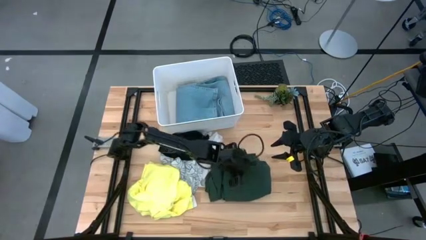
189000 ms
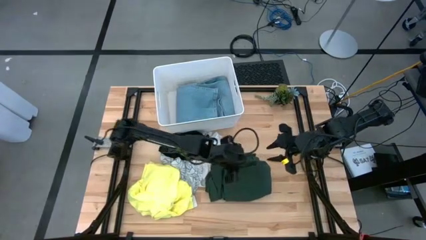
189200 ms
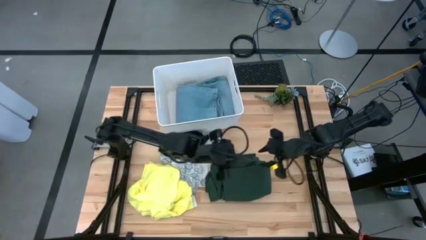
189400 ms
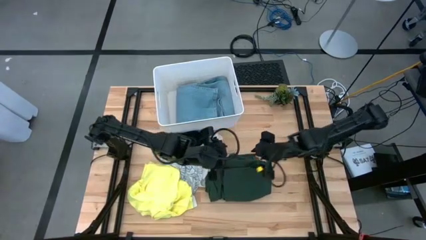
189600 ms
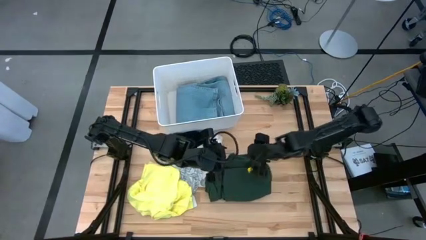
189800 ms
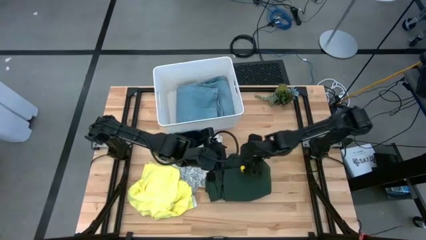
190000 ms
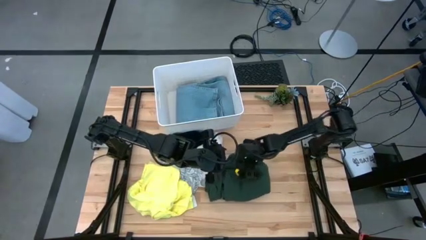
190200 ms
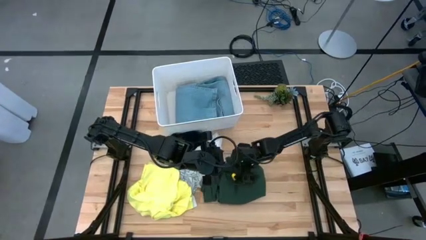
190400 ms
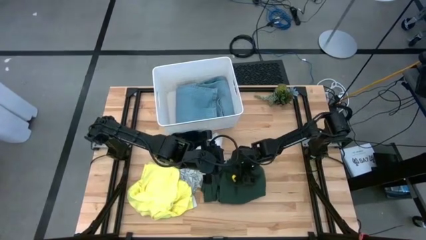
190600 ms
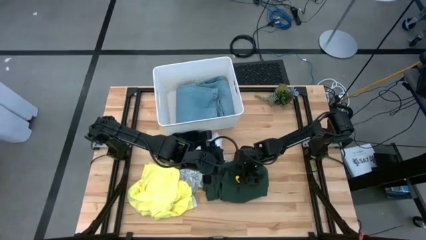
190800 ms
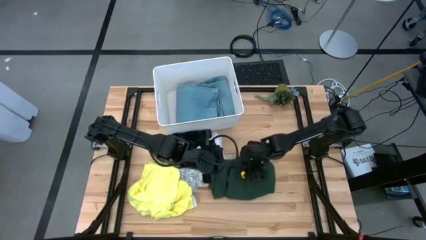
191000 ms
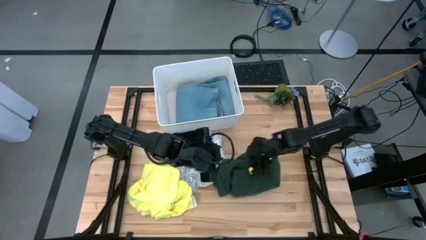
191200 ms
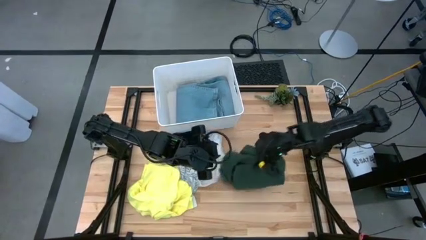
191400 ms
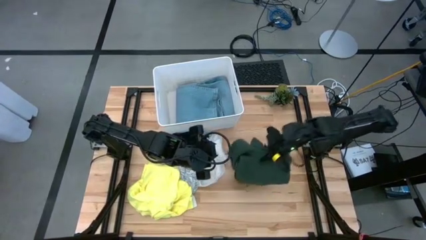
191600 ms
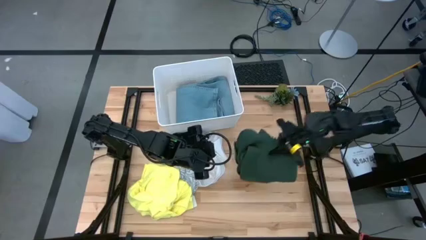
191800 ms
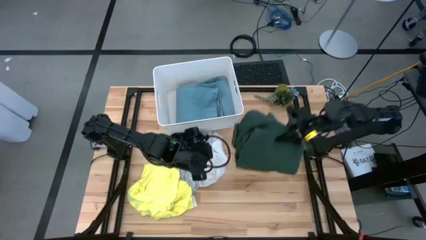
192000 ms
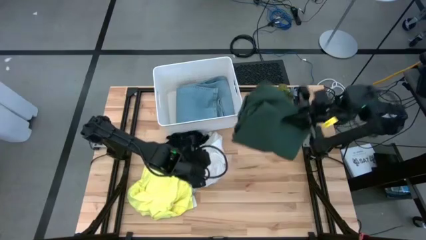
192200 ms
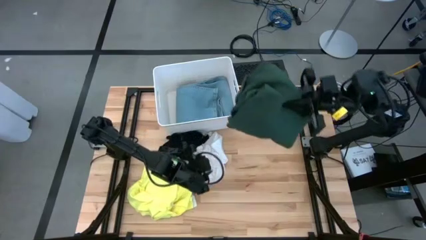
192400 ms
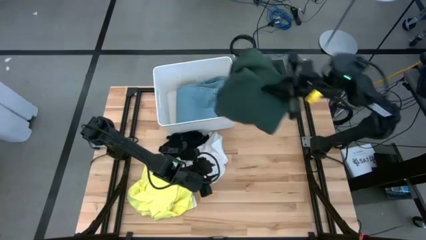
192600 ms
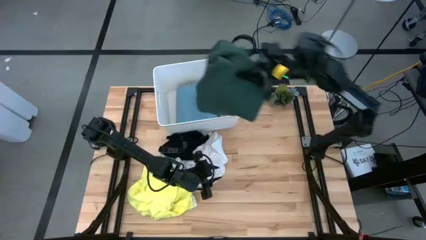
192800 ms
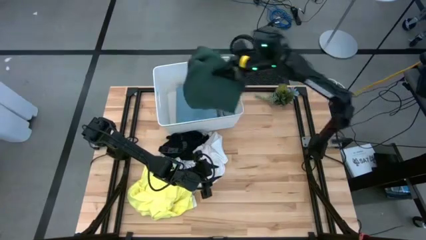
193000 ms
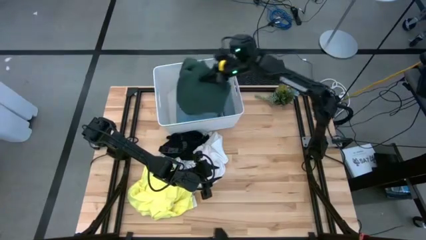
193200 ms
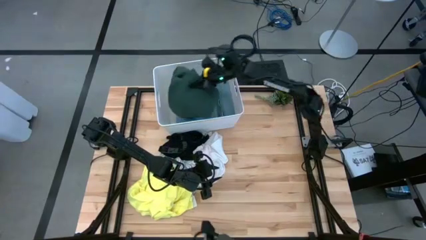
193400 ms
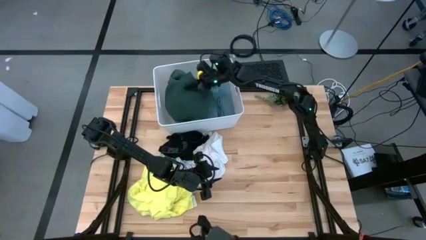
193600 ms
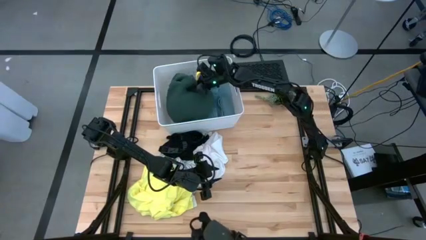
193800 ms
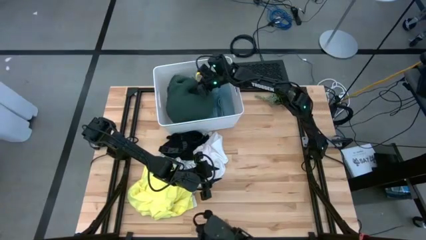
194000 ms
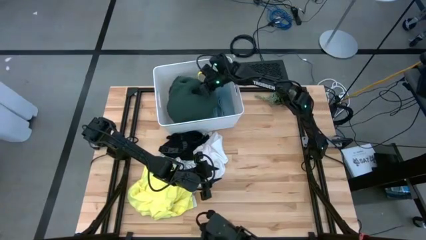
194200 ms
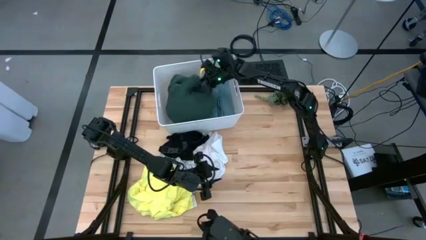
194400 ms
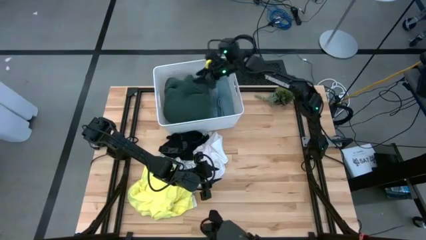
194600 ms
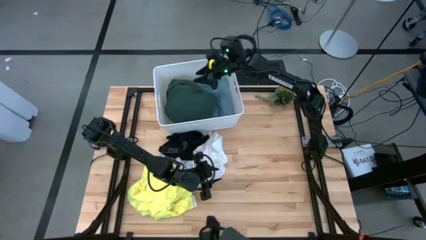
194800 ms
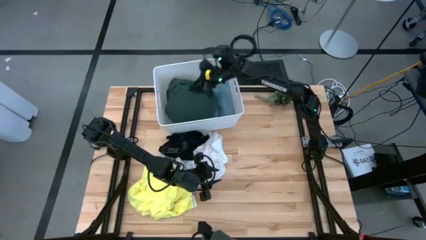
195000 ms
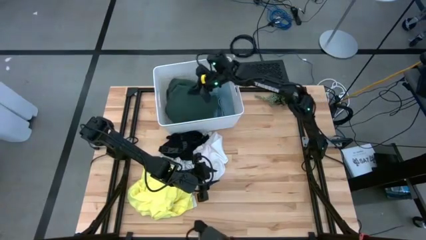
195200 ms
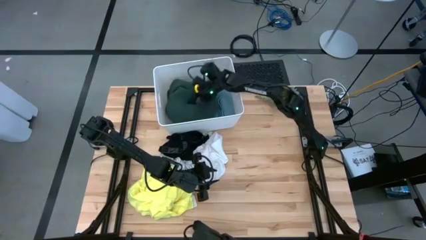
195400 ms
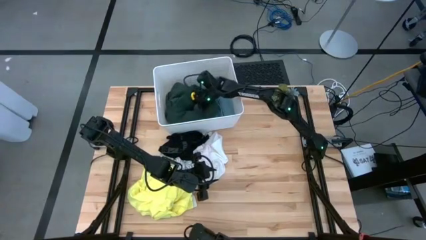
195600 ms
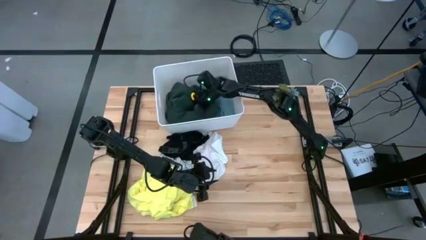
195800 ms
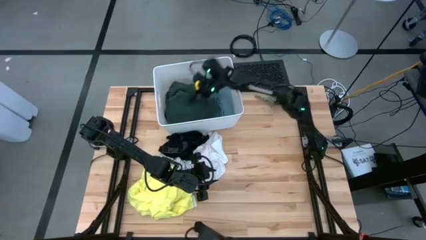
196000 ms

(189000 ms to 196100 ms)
Task: Fold laundry
Put the folded green polo shirt into the white laundry bin

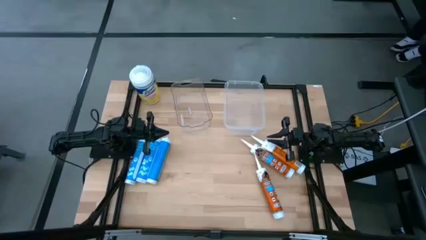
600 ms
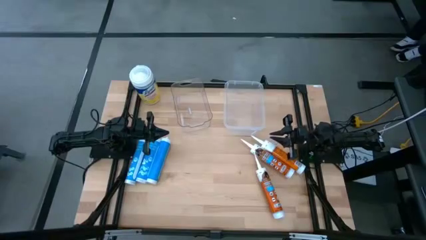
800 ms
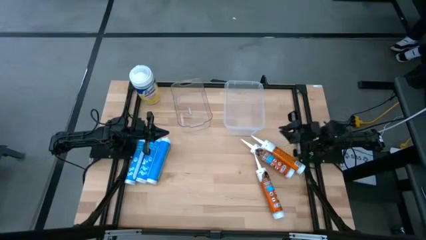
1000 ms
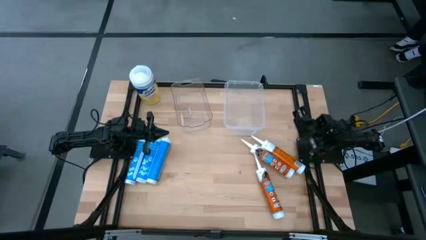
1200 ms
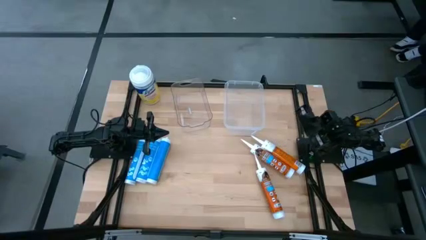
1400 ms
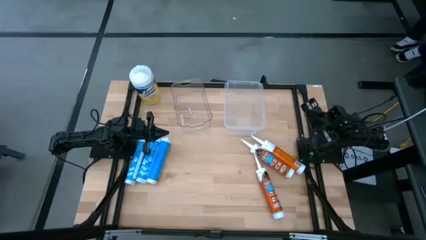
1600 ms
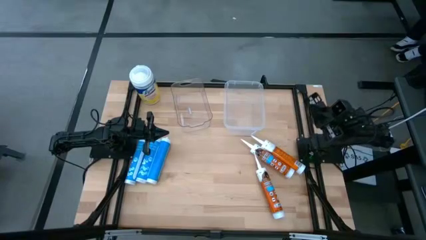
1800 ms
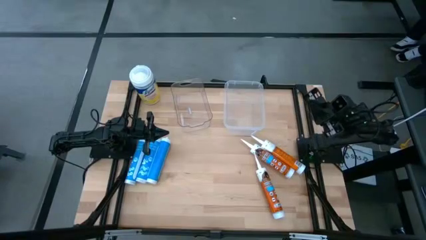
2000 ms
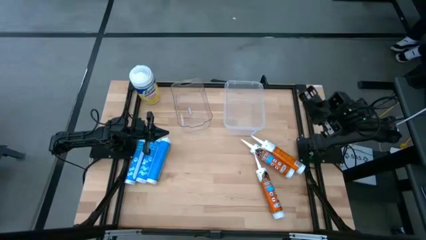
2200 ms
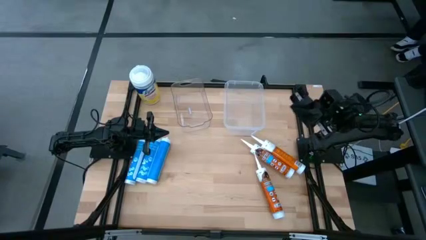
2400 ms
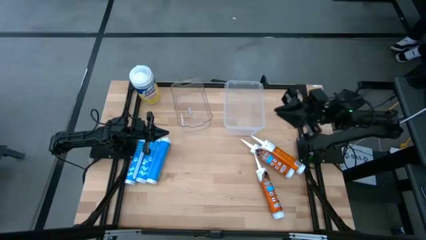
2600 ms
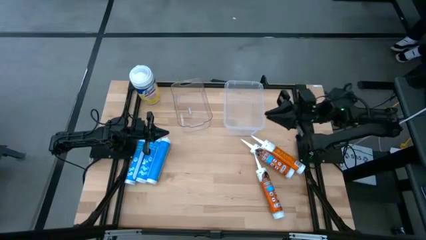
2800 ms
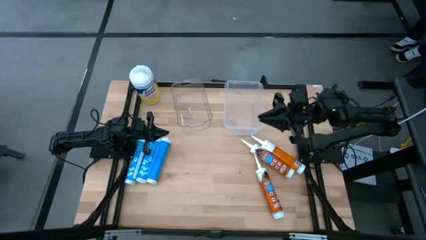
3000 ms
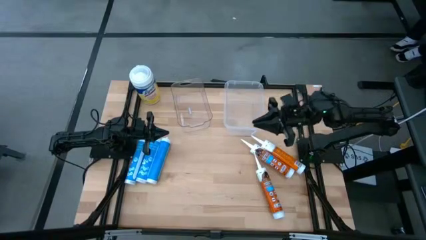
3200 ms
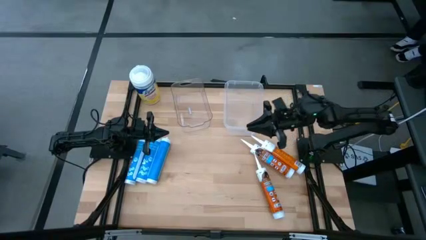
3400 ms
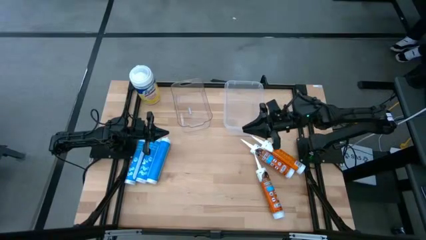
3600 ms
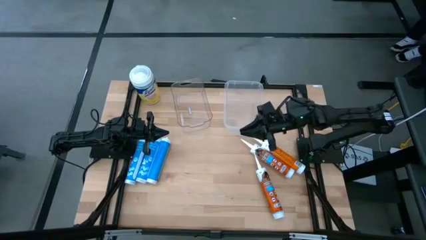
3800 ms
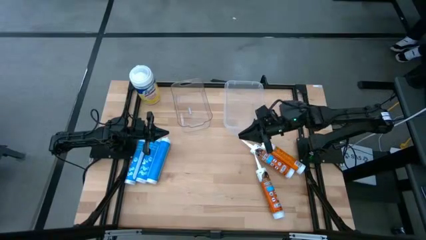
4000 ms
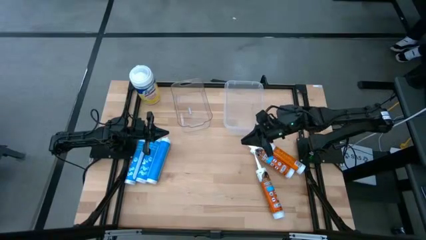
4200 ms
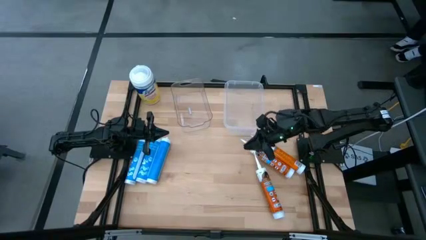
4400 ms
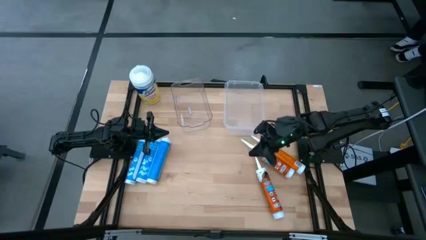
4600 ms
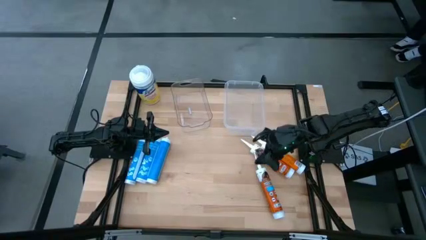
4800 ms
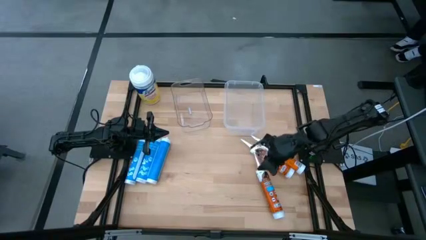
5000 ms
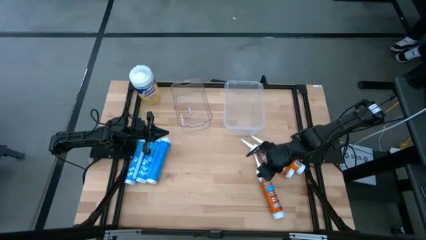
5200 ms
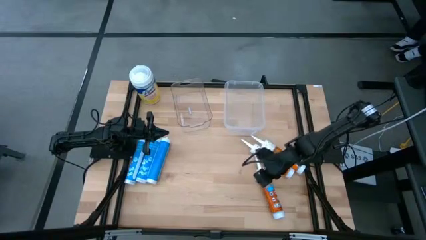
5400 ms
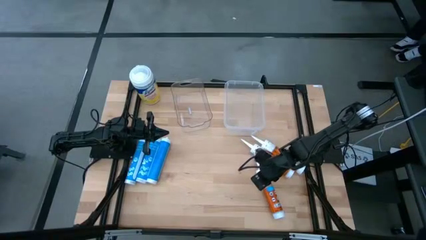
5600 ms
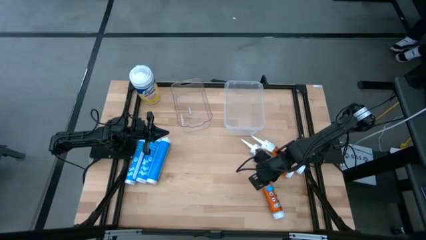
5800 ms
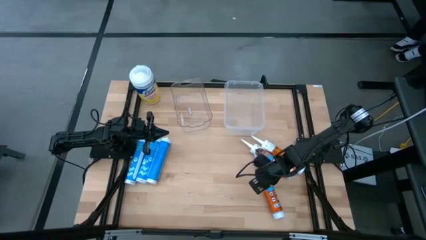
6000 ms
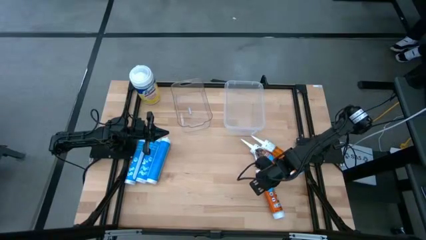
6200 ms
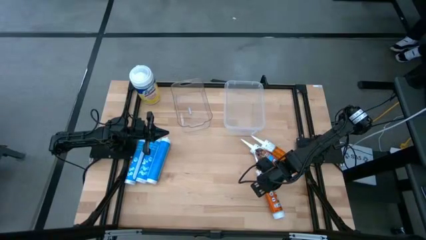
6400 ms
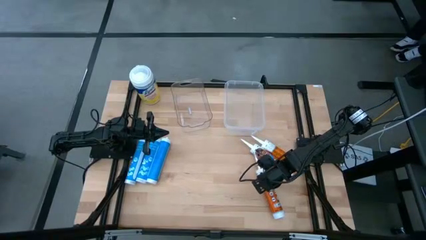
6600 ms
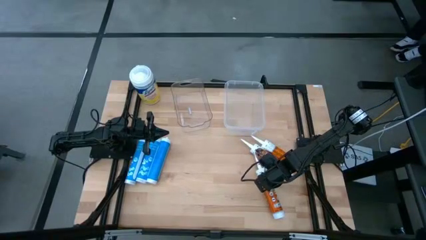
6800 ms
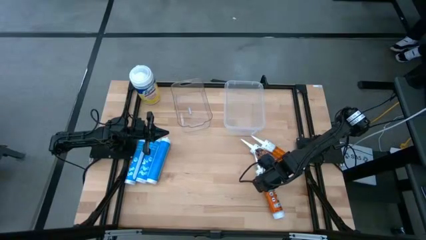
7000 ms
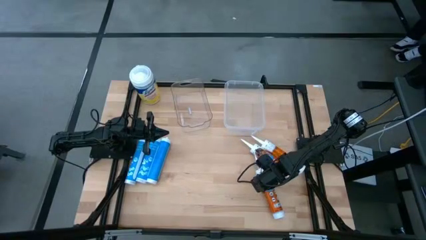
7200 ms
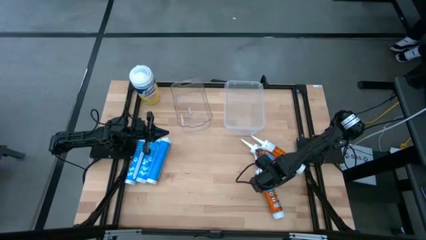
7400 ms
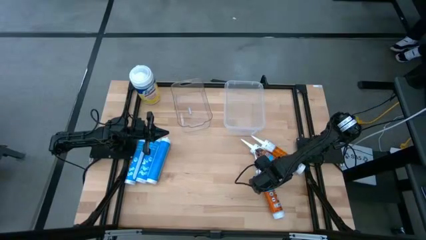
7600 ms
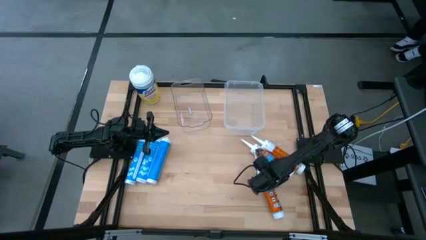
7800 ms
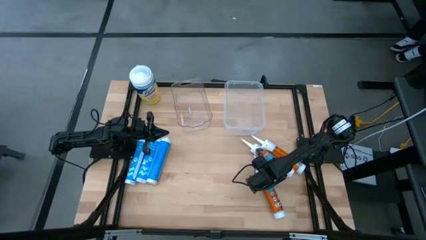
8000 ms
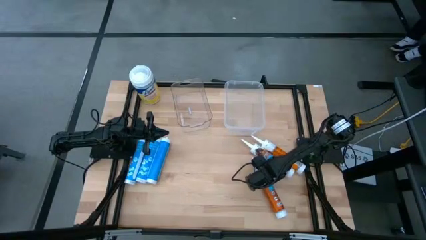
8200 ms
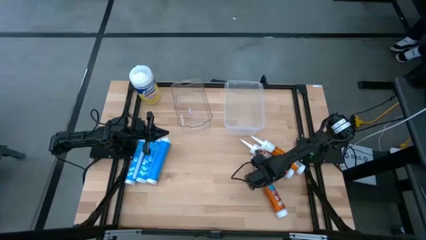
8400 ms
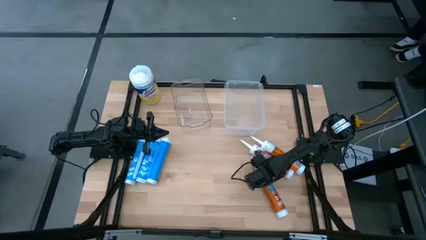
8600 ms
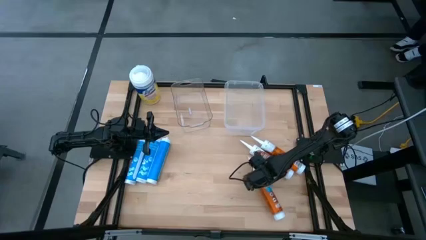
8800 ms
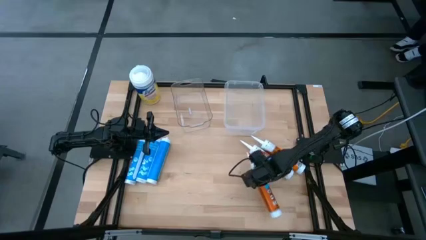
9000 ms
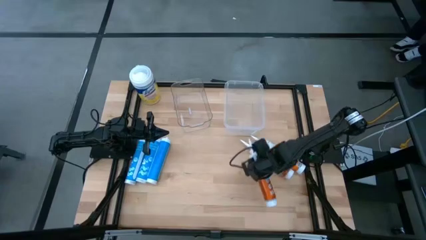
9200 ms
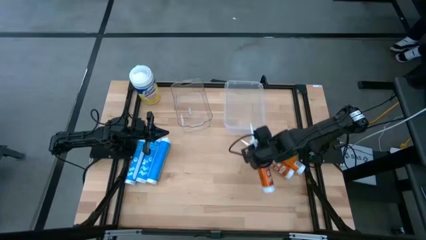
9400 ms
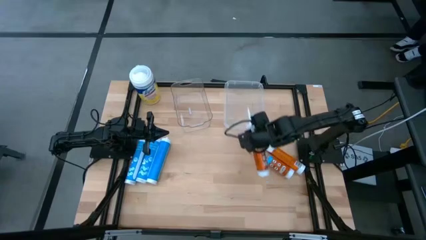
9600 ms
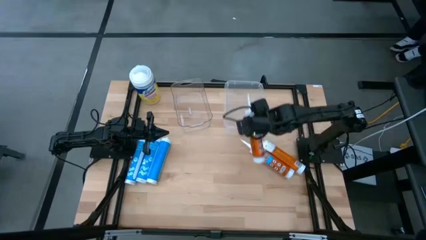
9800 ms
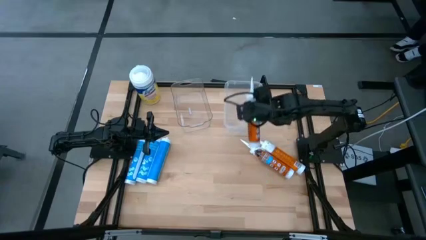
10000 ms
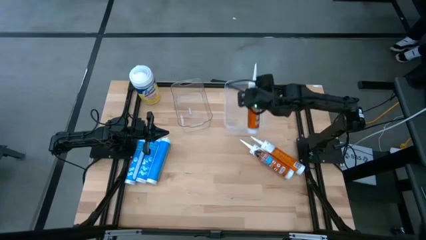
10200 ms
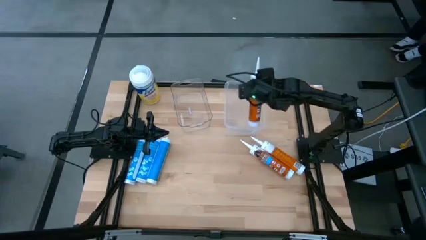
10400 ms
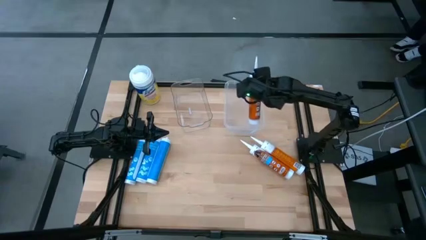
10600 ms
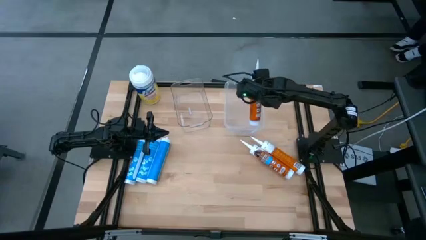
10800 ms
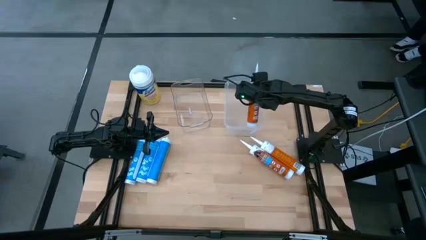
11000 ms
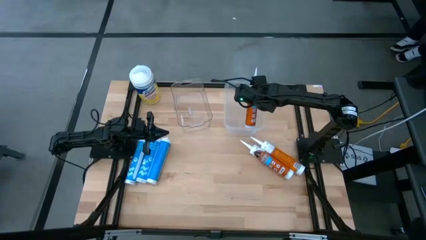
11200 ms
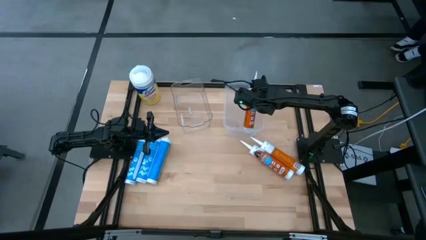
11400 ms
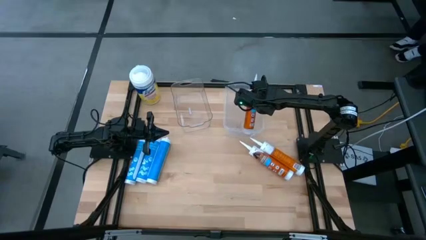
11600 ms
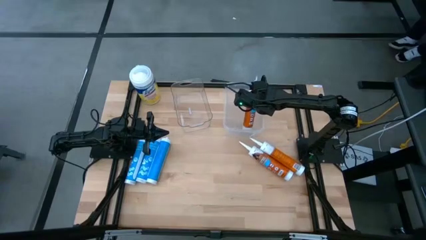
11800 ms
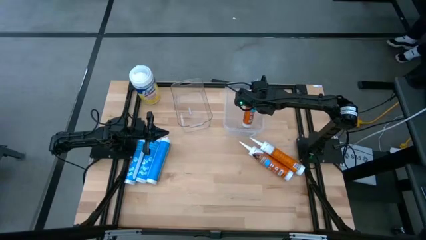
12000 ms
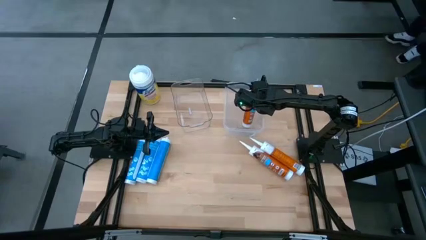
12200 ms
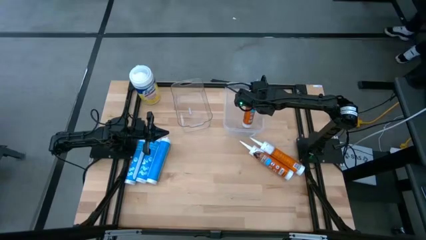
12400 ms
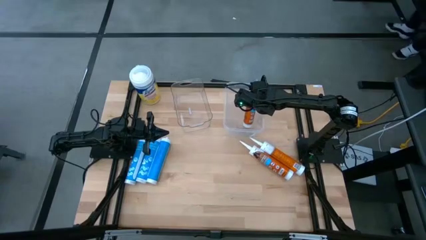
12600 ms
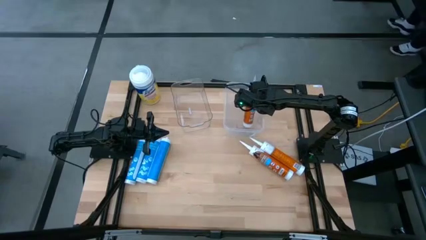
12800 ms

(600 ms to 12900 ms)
Task: Pick & place silicon tubes, Sealant and Lysol wipes
Put the bottom orange sealant into the right transparent bin
